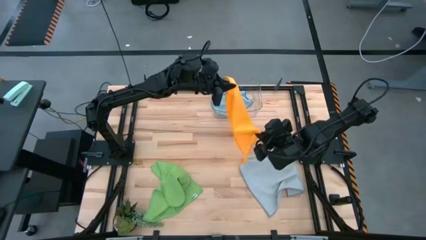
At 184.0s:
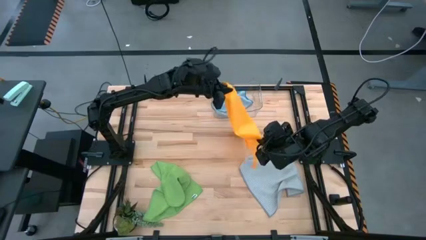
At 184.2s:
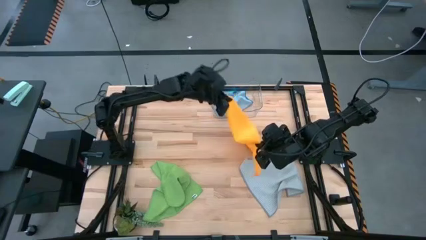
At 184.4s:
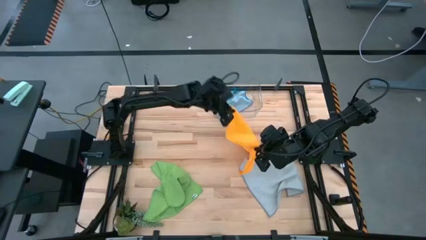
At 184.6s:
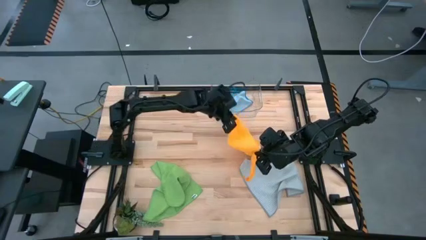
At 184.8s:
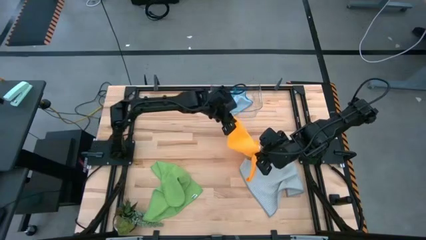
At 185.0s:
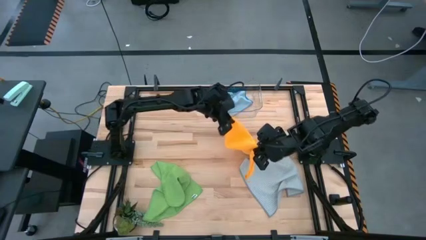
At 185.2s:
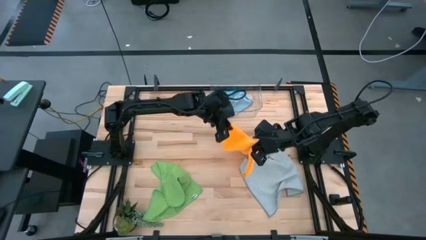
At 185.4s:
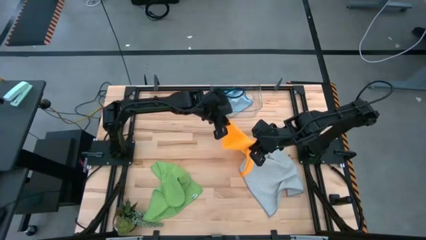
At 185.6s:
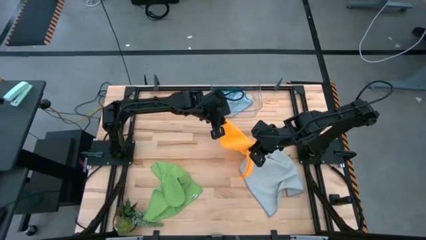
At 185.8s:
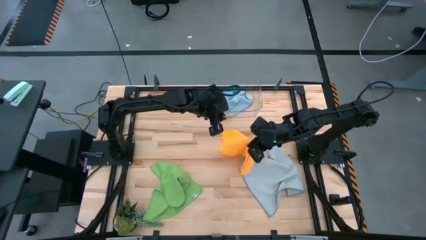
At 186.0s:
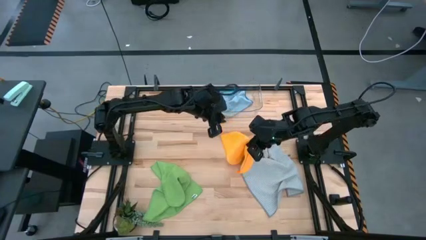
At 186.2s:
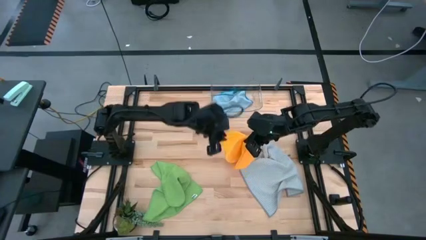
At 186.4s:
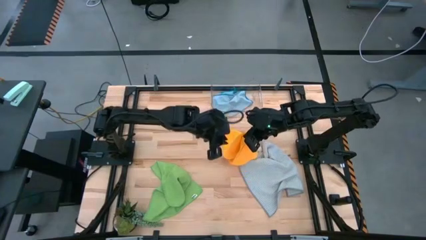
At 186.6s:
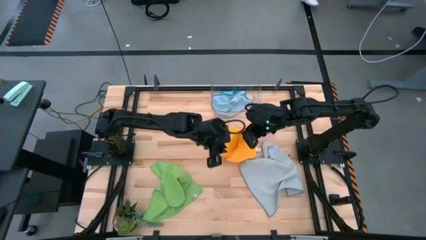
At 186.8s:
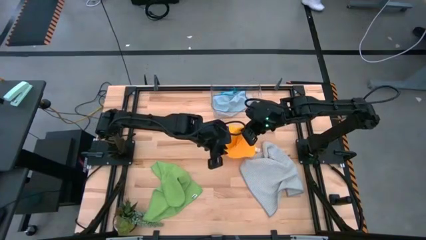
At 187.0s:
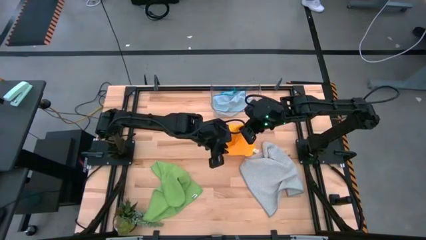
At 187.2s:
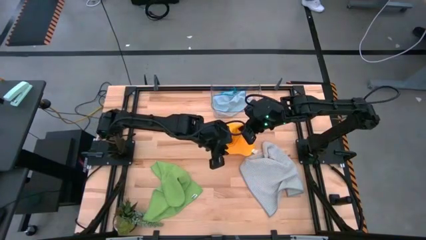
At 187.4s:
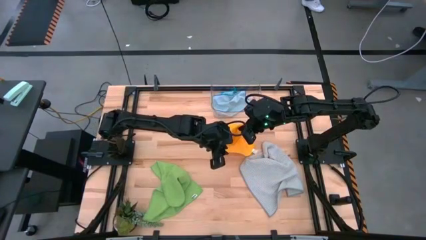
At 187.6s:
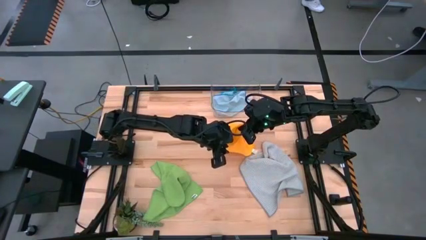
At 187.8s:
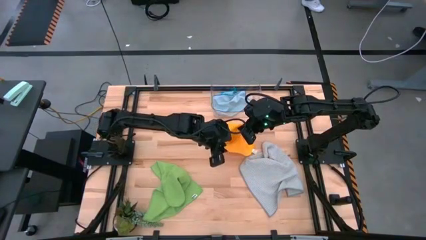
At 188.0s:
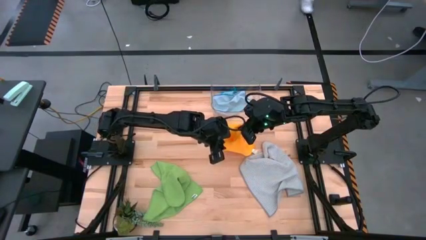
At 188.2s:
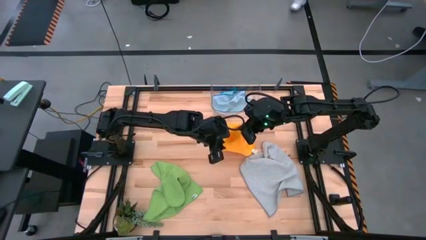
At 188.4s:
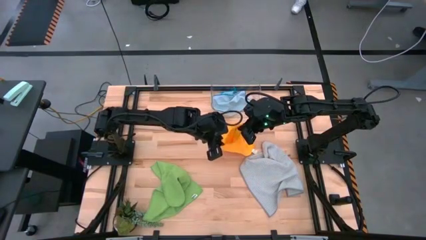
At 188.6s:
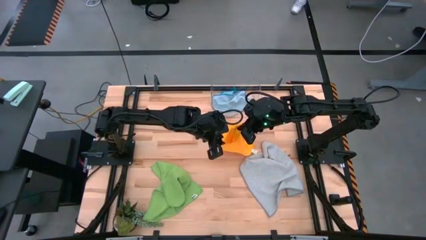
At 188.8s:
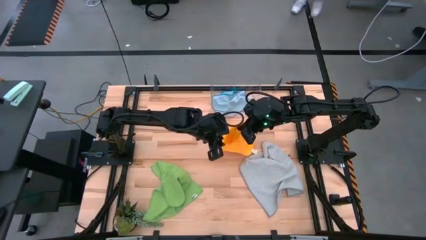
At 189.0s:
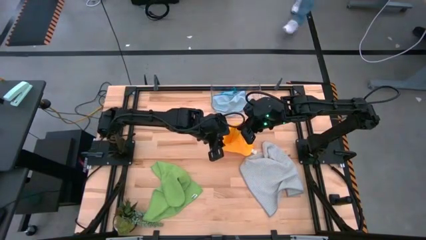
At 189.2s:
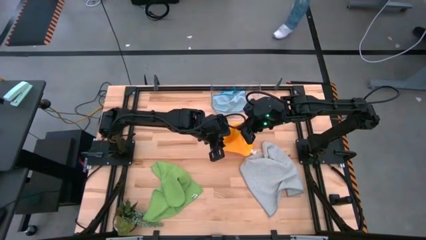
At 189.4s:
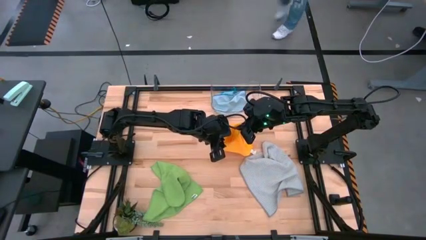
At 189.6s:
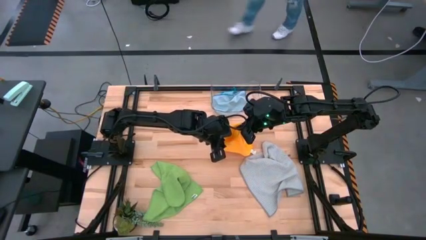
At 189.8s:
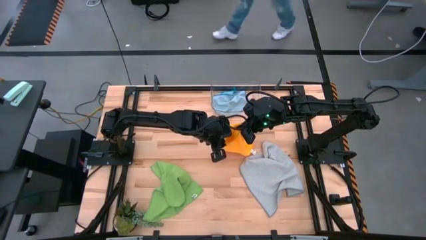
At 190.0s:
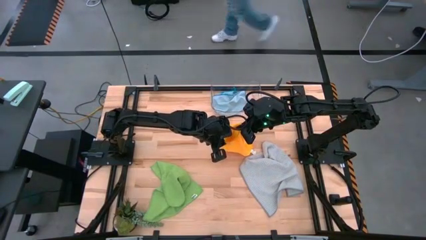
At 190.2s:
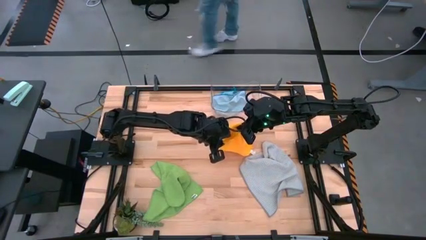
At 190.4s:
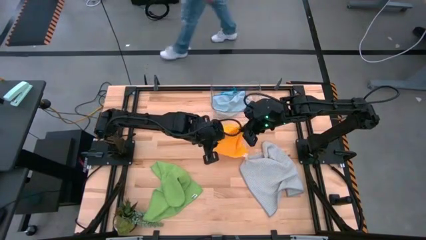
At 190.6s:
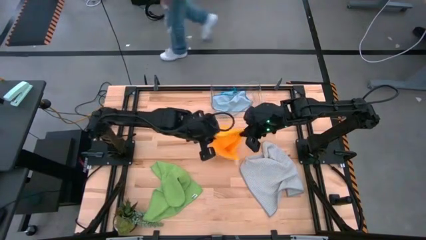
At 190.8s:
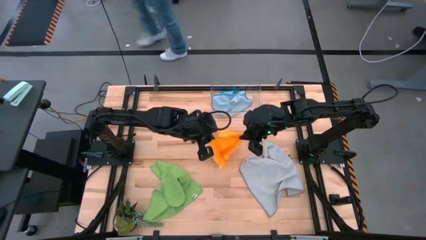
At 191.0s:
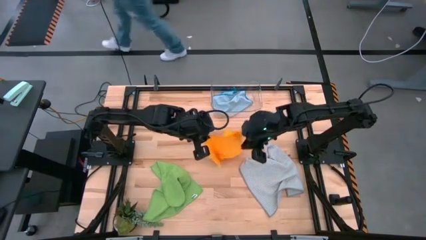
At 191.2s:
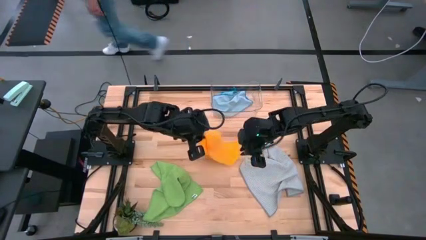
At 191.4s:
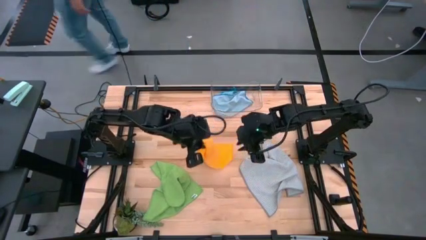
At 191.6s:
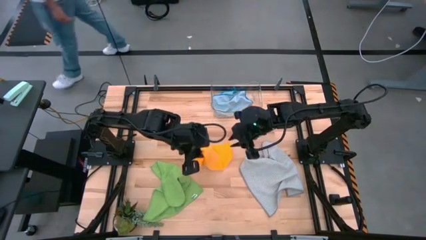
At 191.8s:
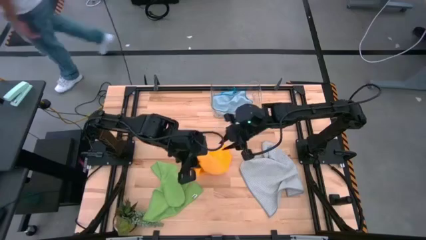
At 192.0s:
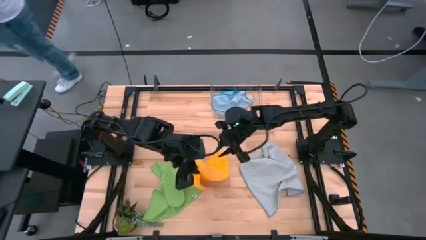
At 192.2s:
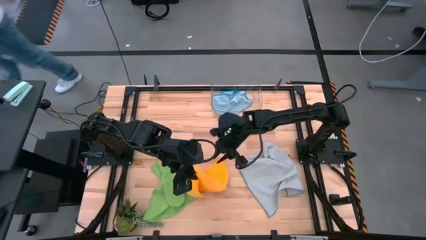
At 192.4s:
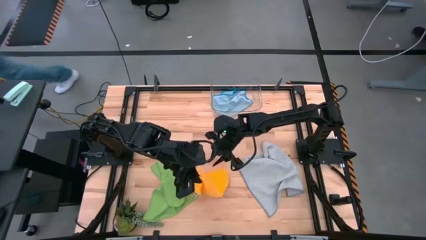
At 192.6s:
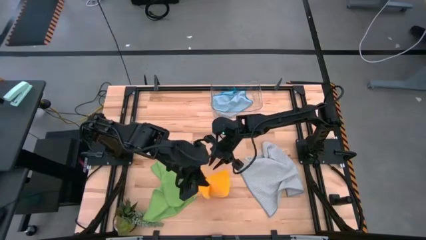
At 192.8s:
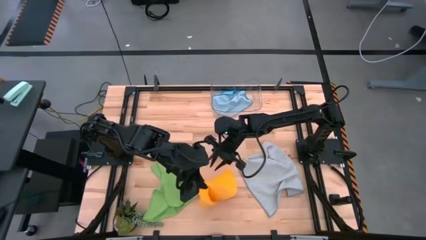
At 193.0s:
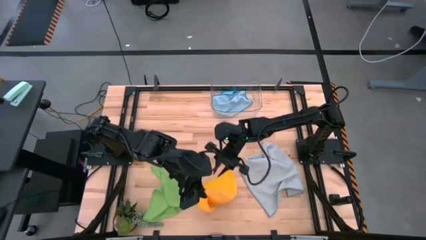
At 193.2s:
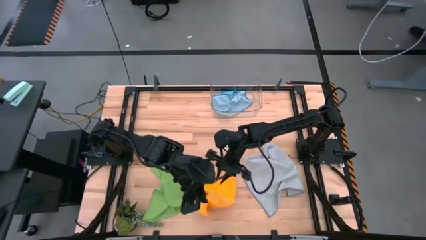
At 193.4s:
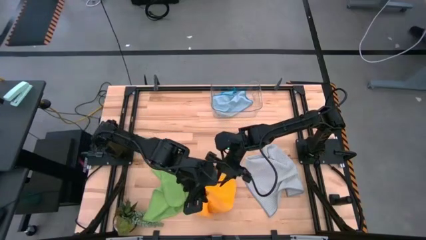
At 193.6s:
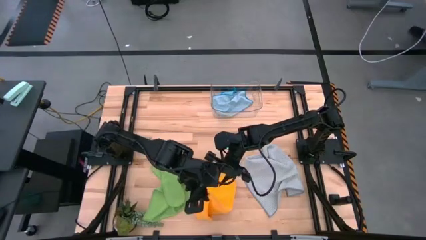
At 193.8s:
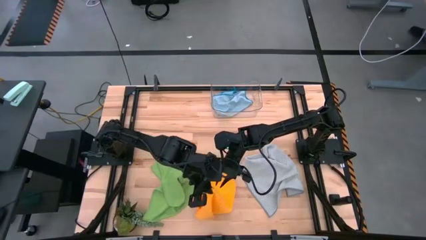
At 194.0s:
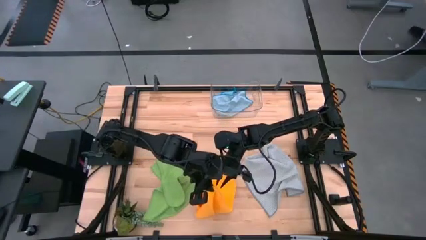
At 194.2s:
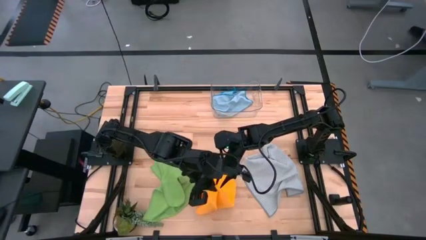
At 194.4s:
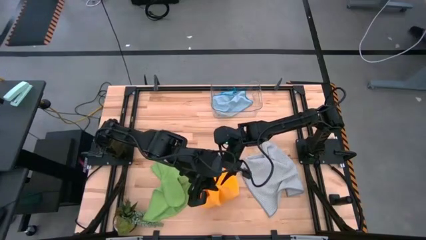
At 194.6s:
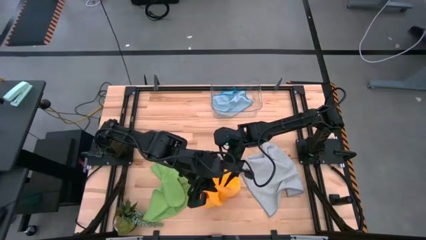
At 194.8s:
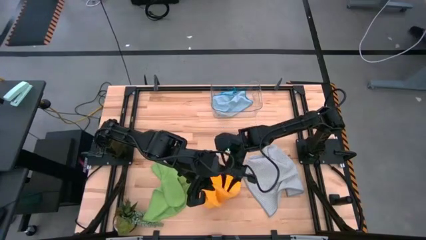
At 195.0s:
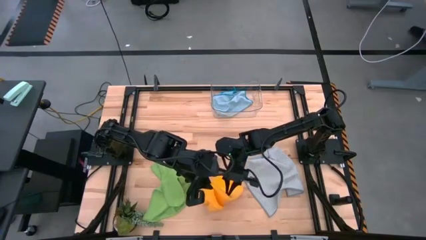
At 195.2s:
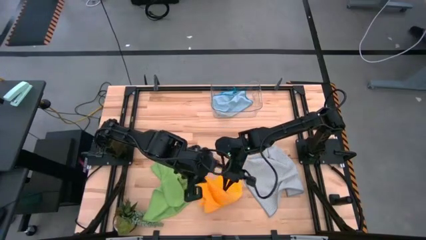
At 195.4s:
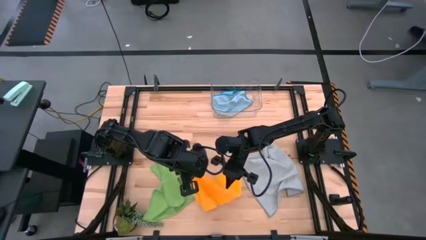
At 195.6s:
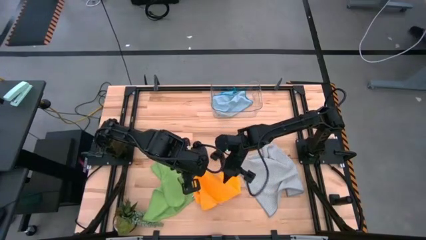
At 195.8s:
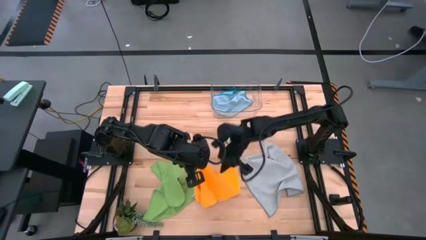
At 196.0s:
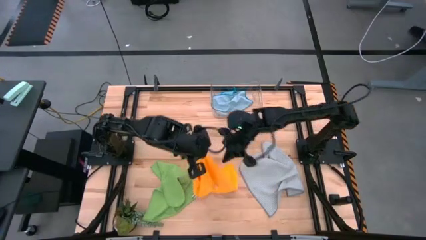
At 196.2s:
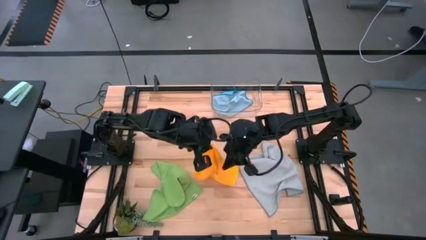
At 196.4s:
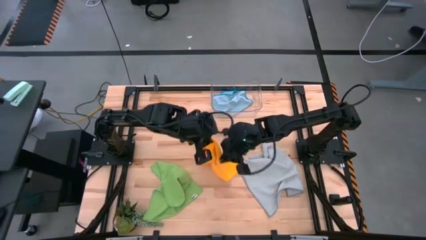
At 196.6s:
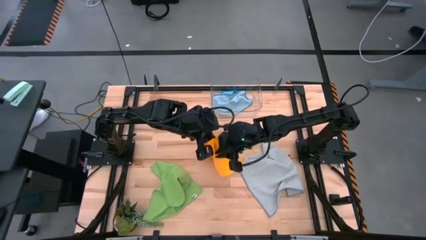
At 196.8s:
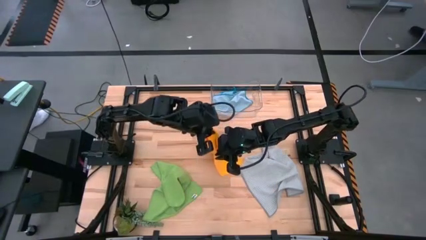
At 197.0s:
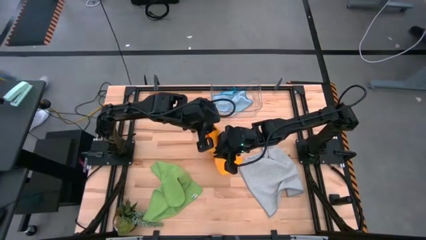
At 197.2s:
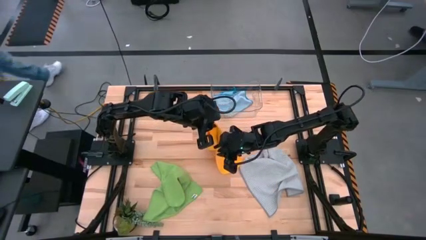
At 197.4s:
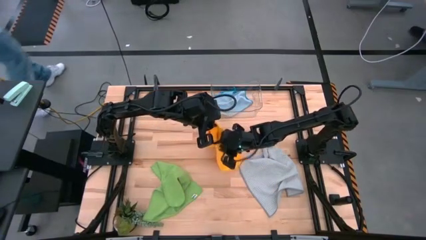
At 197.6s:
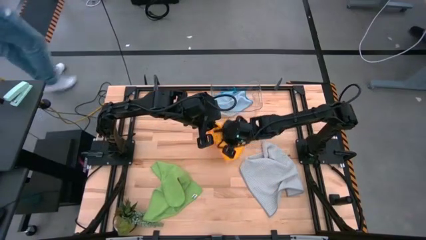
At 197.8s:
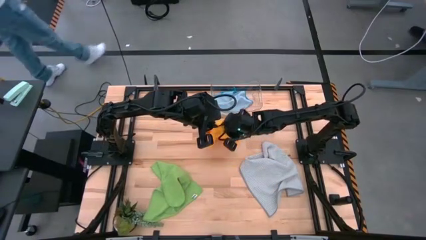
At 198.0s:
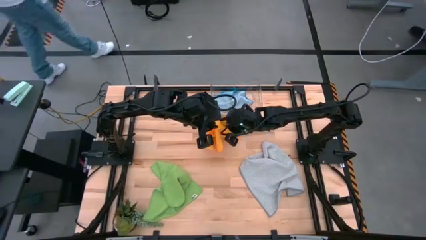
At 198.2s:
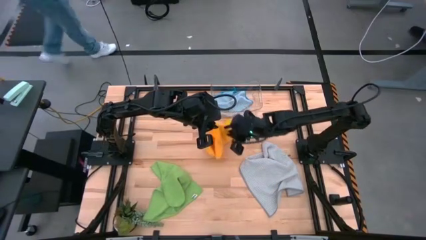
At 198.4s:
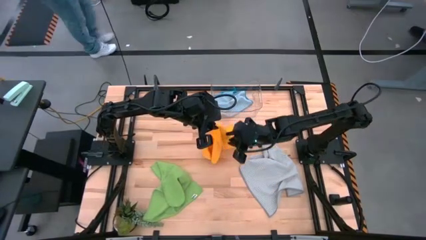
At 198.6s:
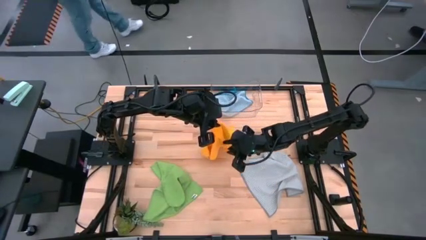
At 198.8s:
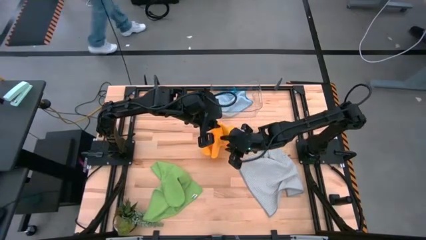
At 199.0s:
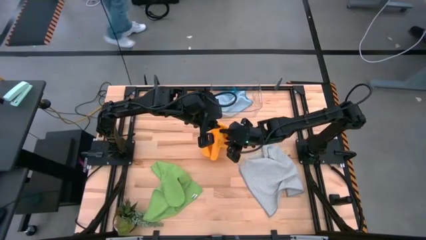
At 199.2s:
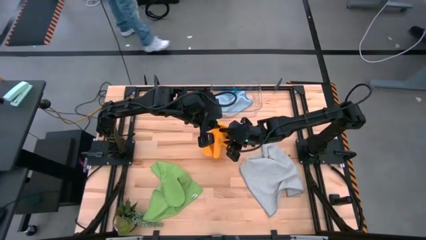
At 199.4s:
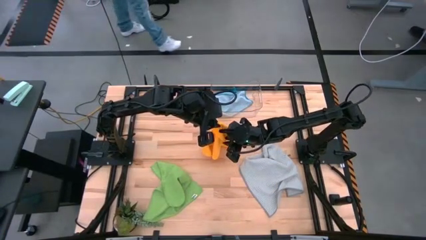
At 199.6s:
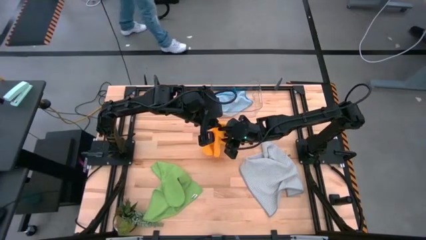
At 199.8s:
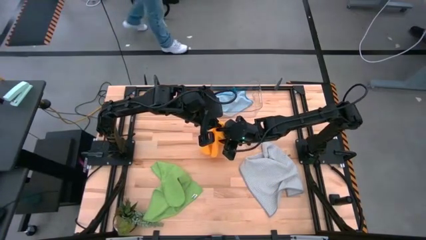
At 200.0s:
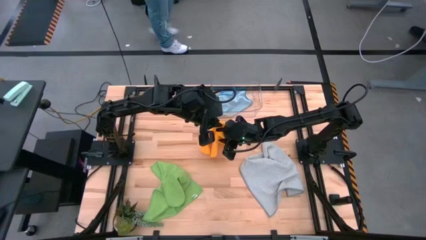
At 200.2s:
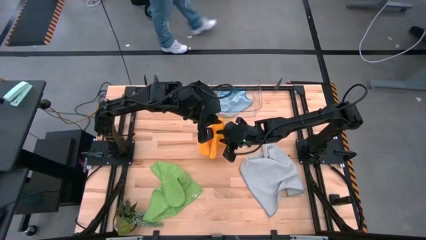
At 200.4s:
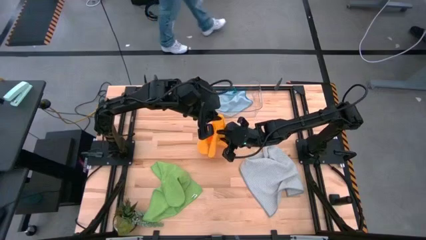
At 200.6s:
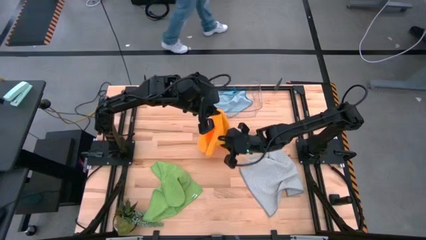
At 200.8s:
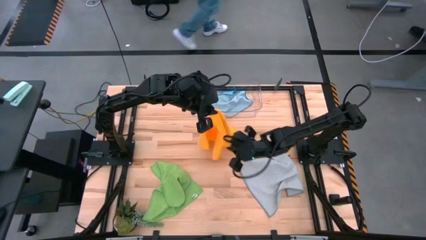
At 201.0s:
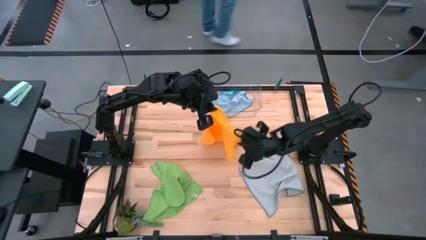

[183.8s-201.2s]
Task: Fold microfiber towels
Fold the orange microfiber cloth
